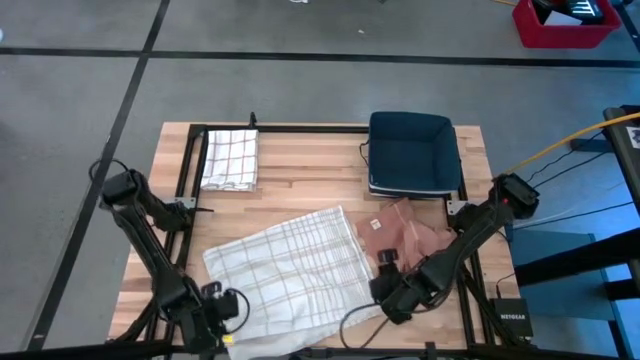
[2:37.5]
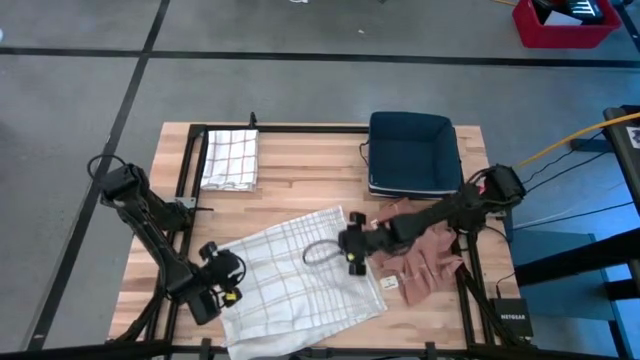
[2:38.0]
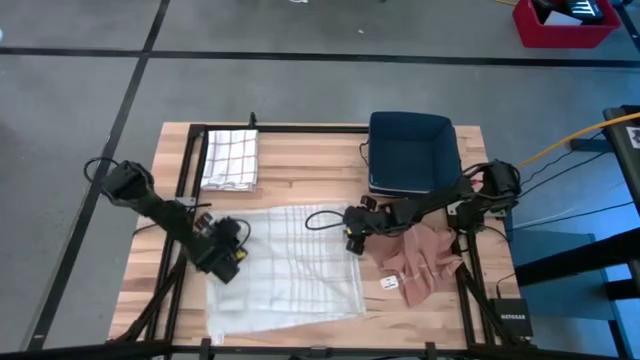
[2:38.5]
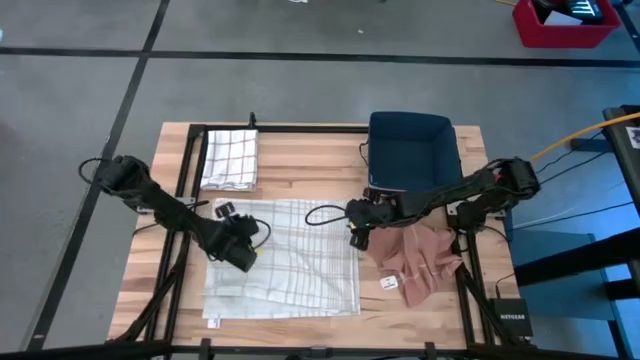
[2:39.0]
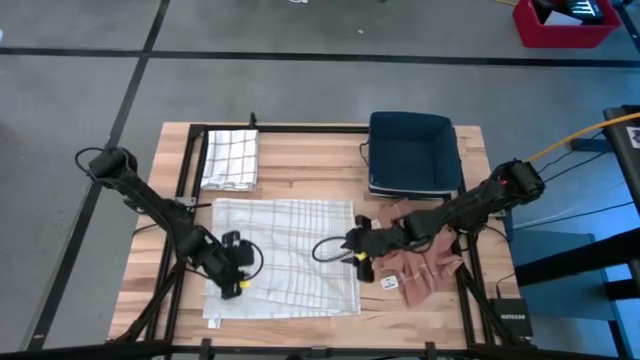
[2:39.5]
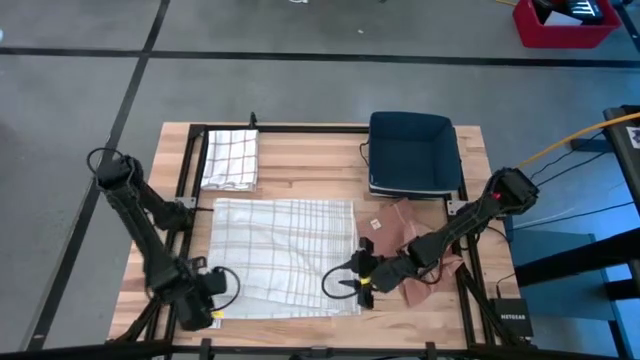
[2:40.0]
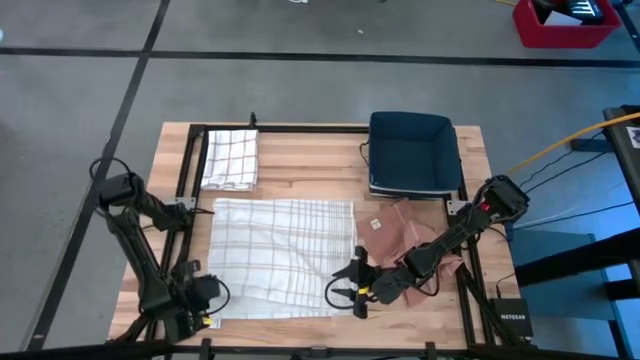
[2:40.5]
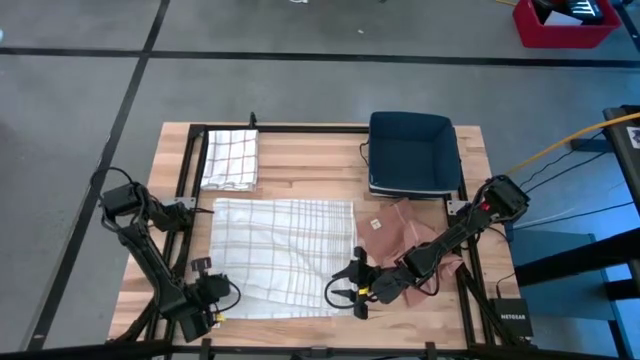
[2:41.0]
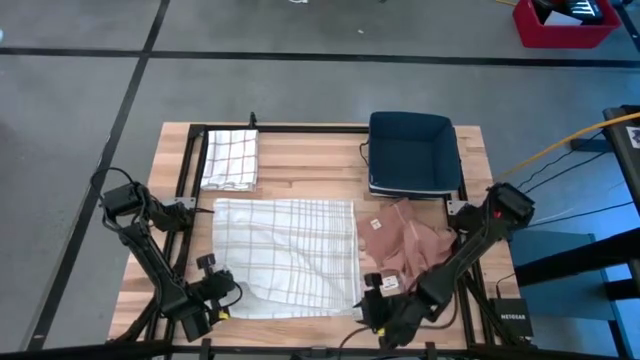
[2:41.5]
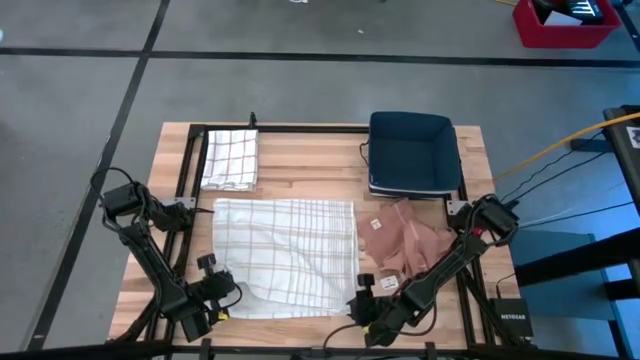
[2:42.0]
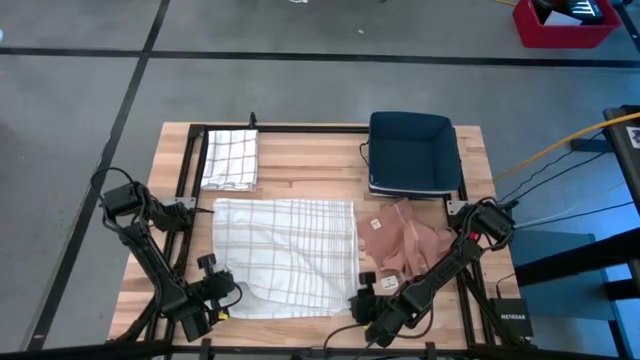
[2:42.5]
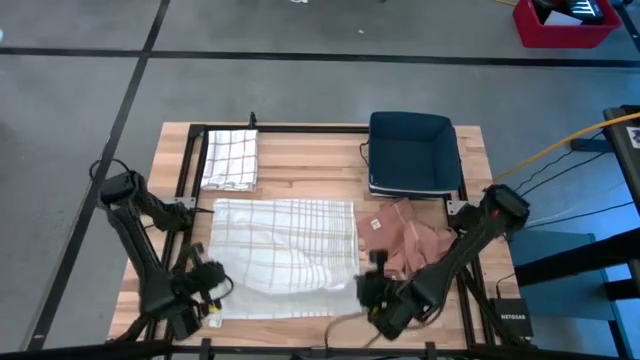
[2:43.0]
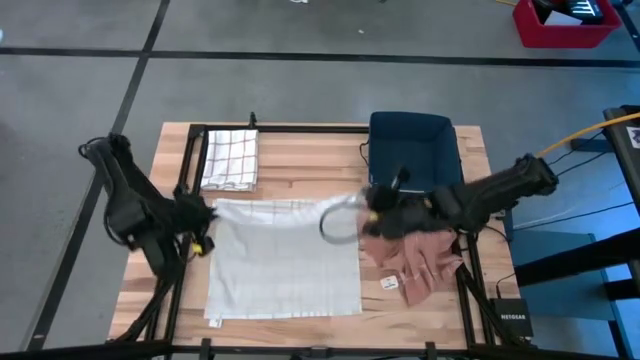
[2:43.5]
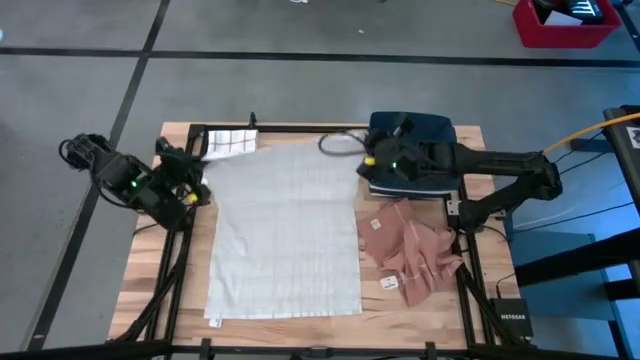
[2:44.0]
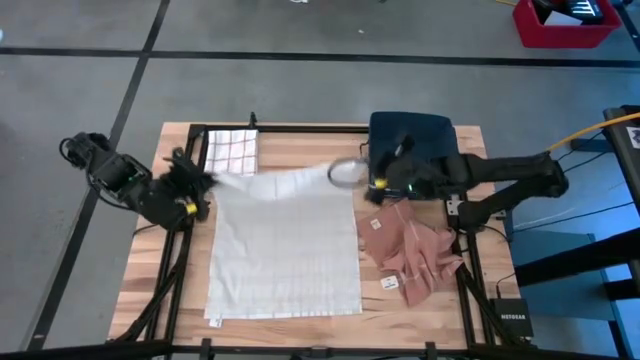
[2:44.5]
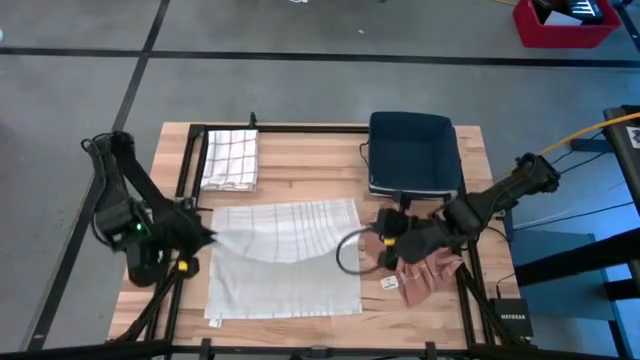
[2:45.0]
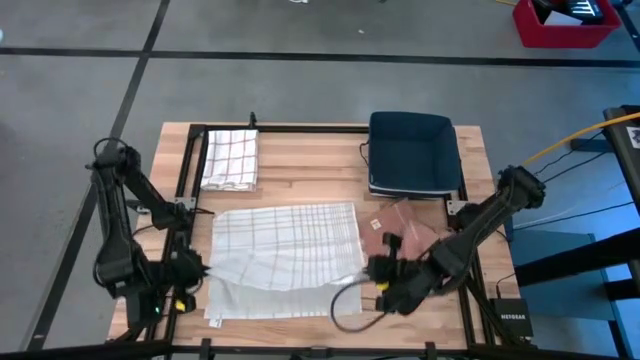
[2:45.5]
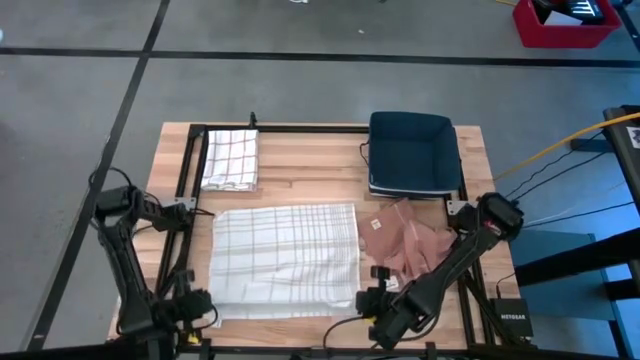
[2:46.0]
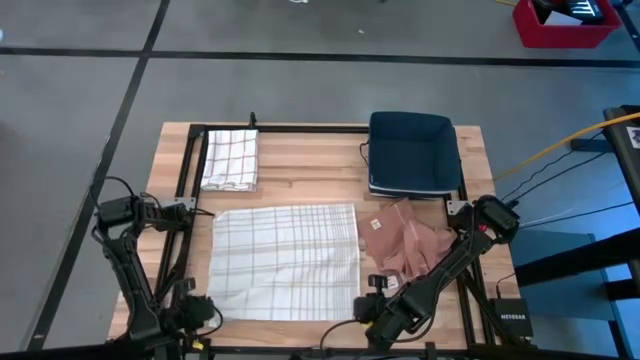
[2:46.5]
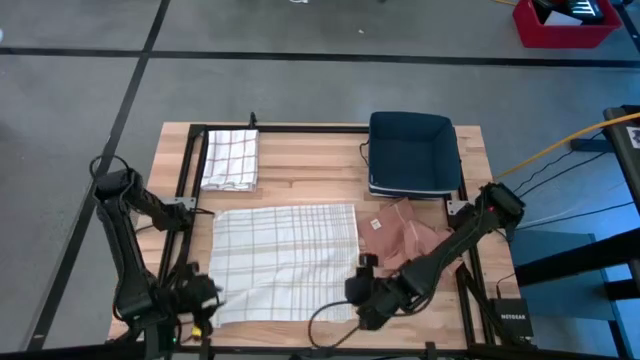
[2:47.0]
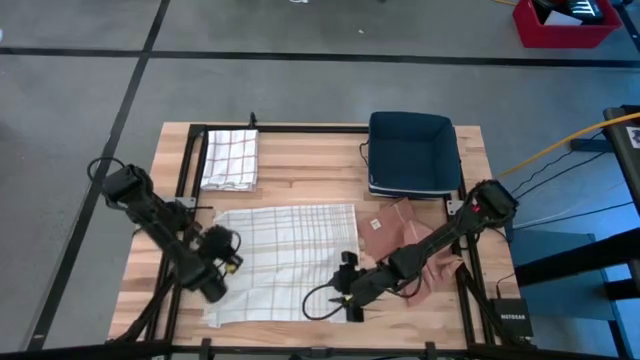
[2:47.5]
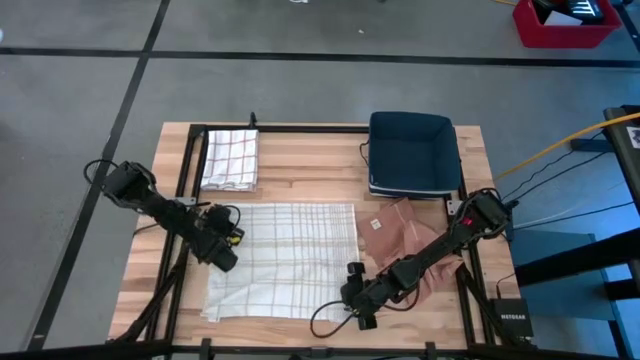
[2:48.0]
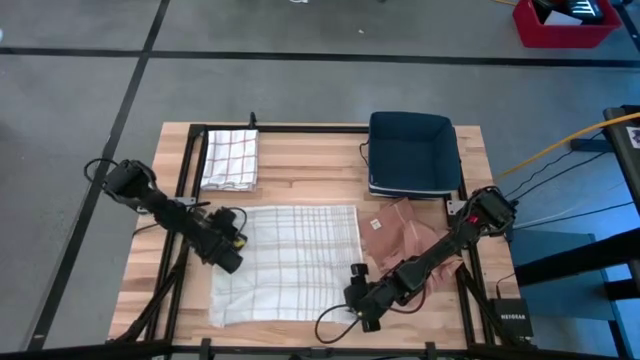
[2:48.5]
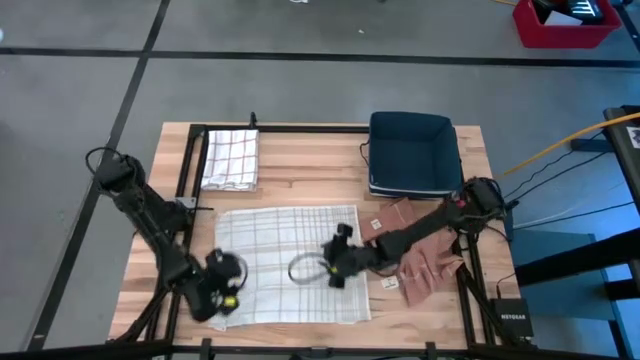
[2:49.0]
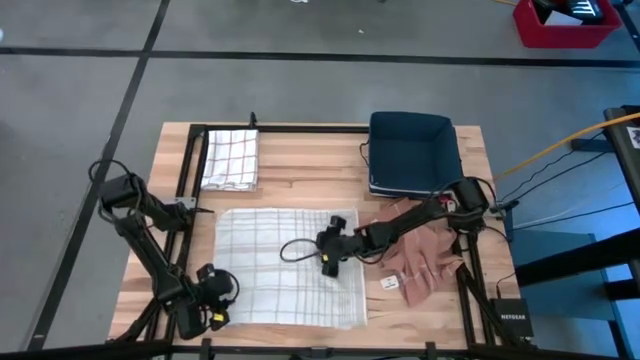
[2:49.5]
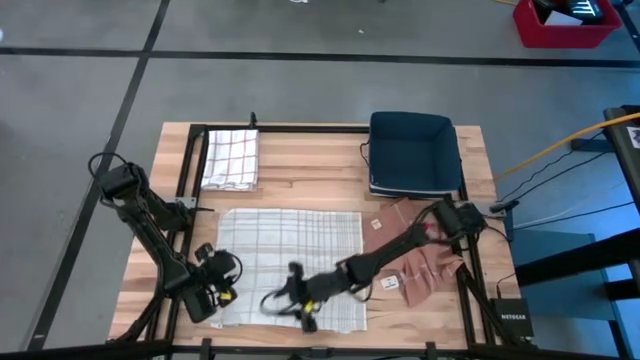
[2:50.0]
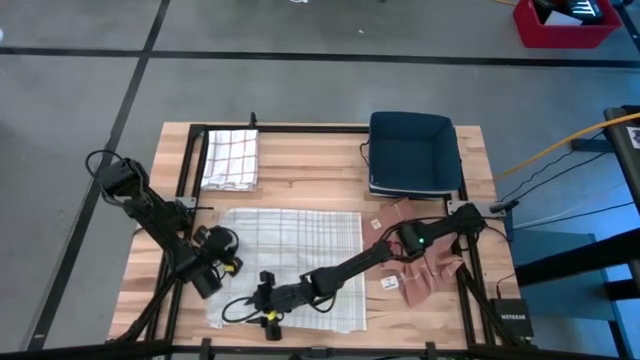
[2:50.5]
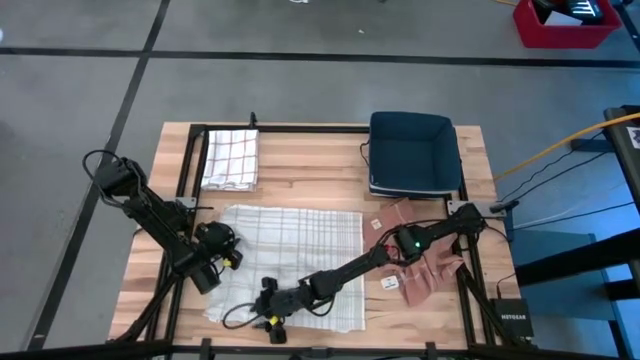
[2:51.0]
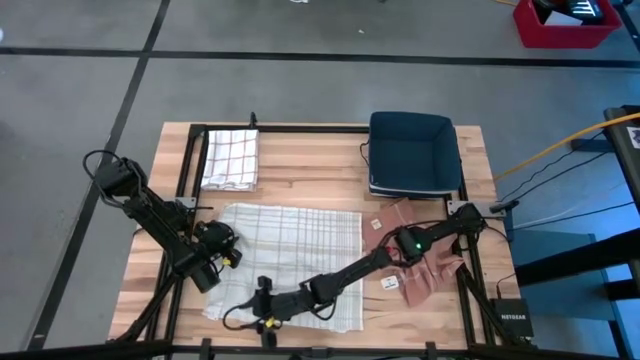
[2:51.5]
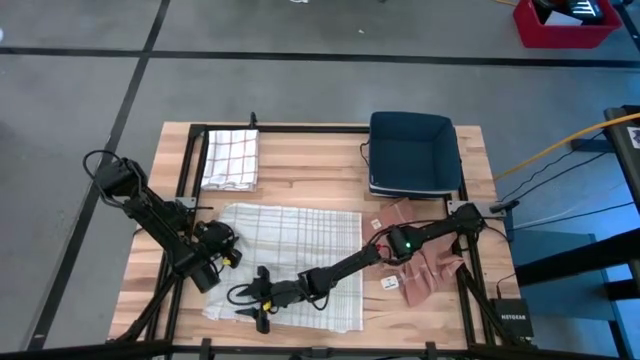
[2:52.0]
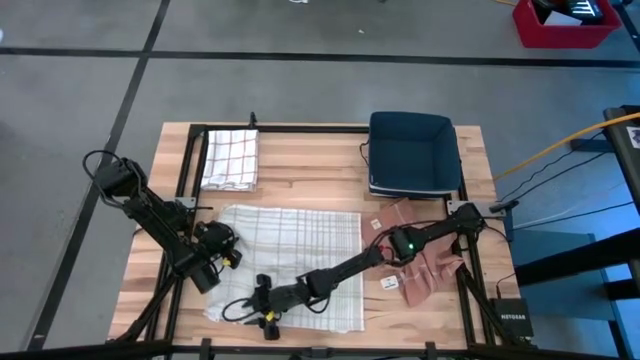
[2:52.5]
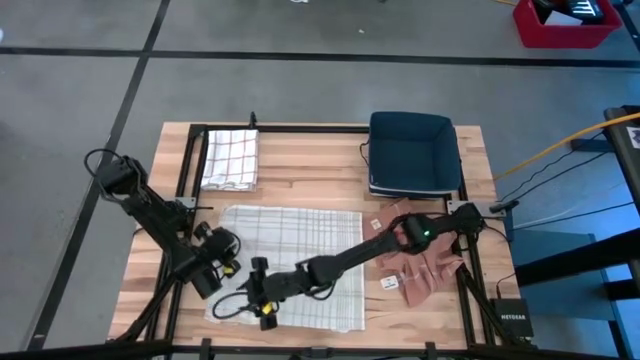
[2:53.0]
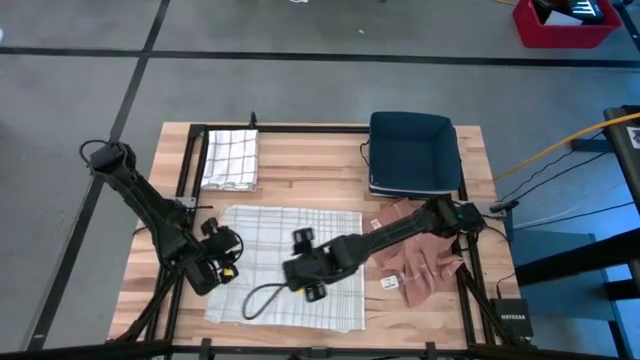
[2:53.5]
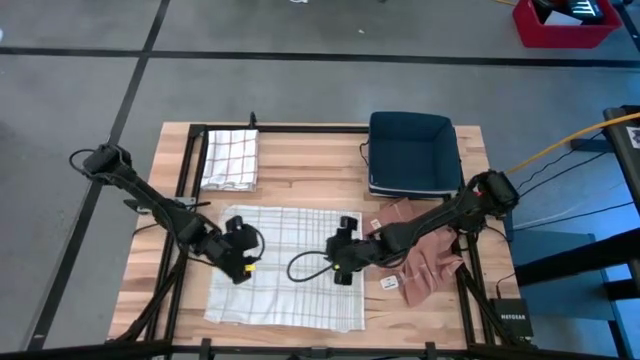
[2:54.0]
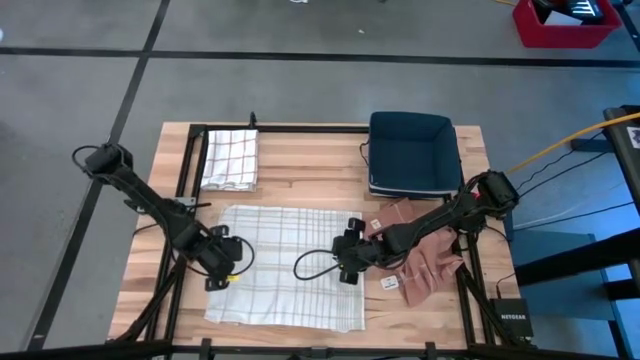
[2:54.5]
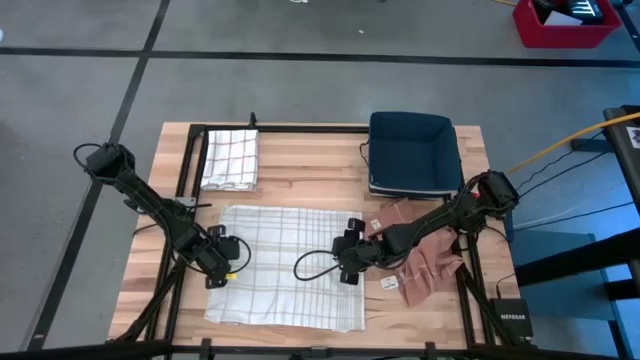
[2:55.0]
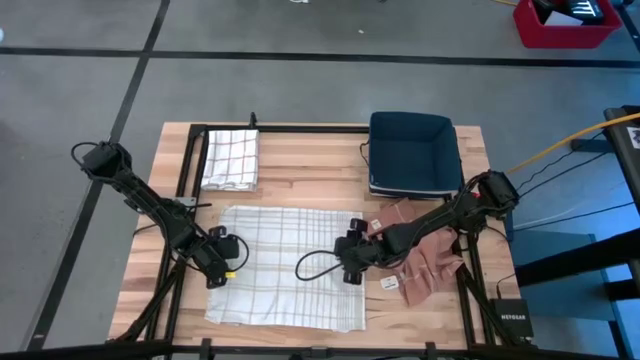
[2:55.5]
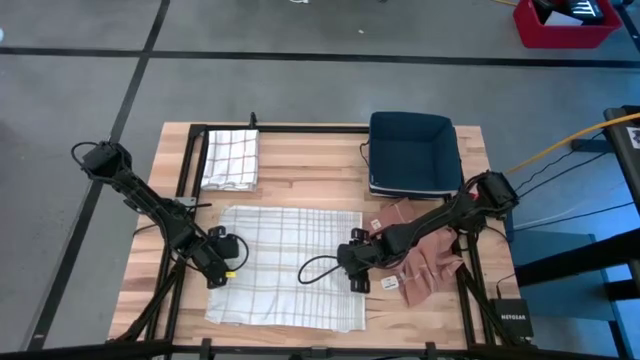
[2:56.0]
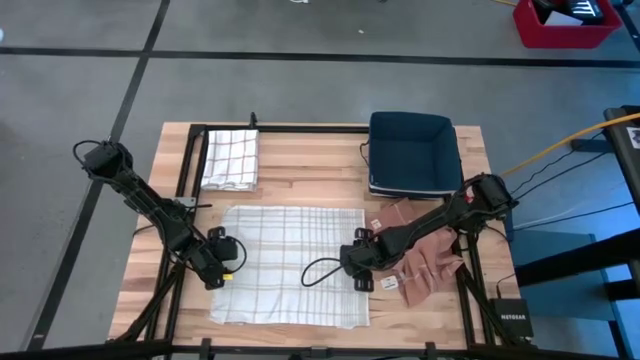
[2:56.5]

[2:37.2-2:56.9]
Task: Fold towel
Fold the white towel on the table
